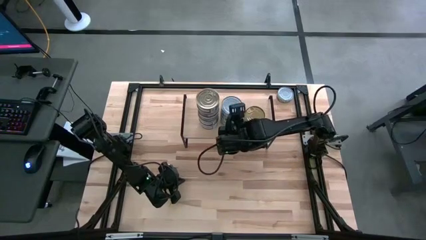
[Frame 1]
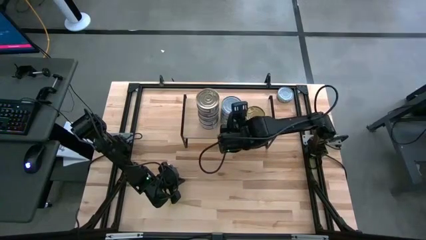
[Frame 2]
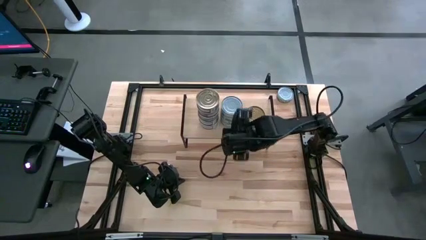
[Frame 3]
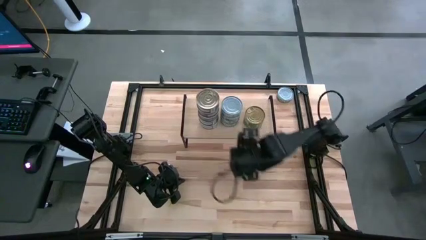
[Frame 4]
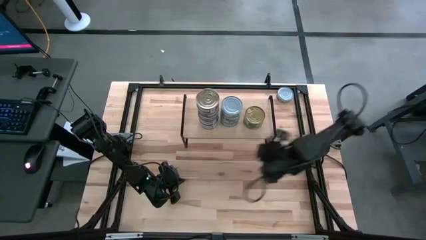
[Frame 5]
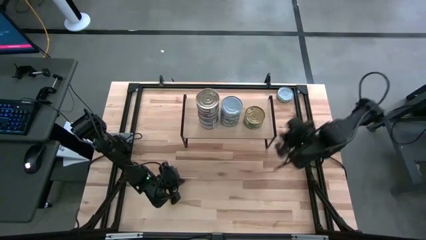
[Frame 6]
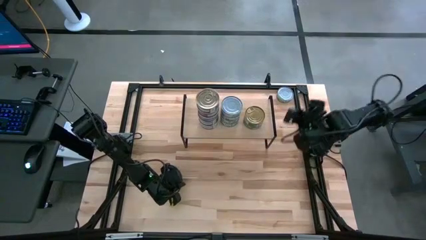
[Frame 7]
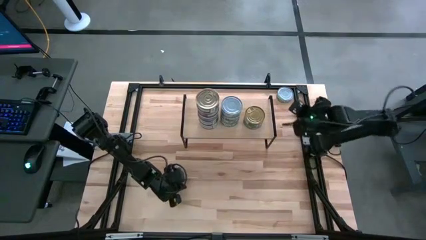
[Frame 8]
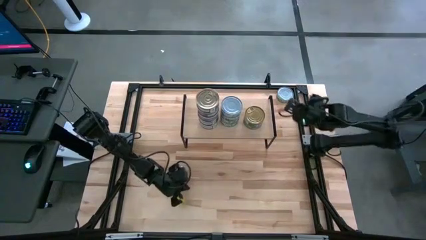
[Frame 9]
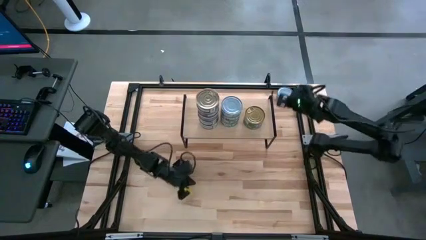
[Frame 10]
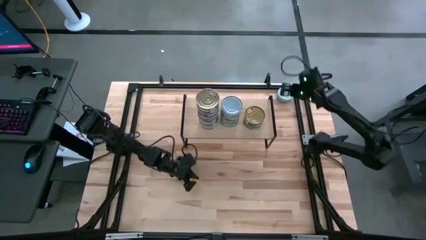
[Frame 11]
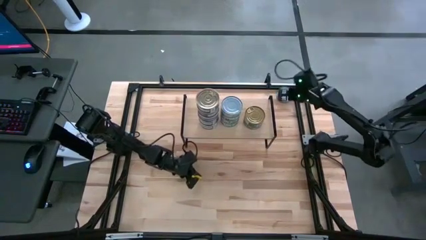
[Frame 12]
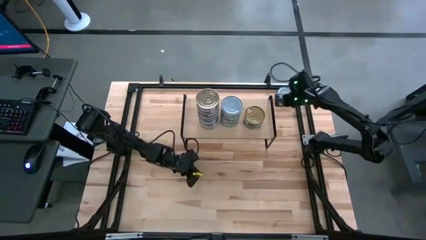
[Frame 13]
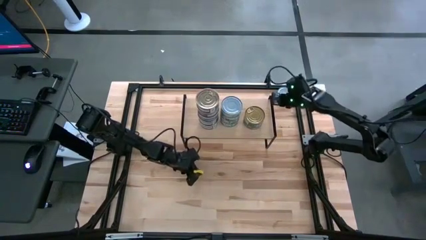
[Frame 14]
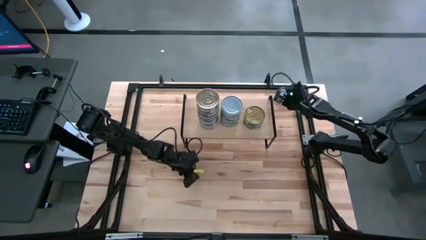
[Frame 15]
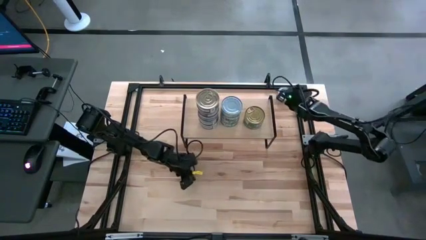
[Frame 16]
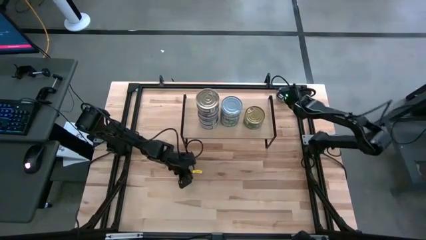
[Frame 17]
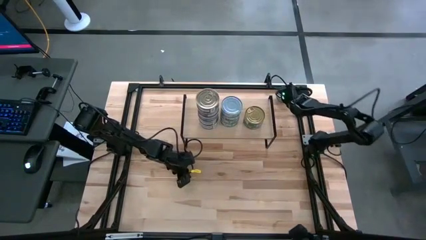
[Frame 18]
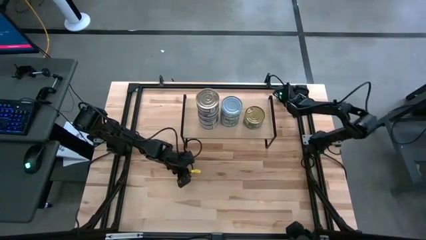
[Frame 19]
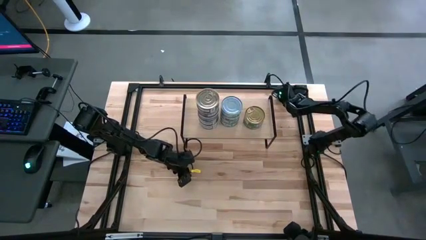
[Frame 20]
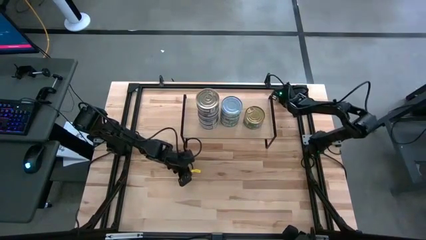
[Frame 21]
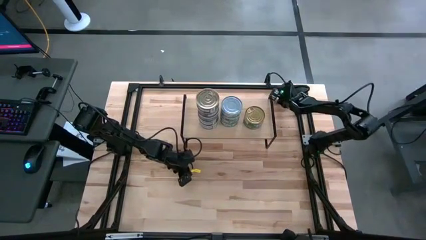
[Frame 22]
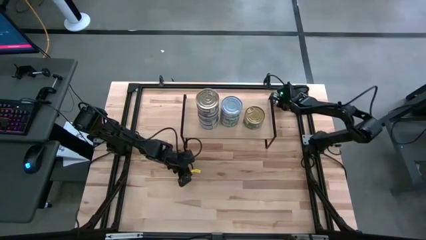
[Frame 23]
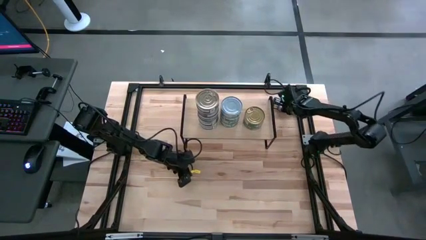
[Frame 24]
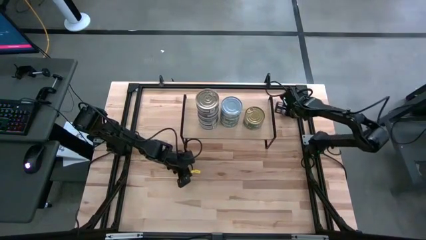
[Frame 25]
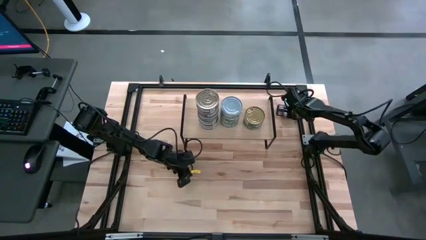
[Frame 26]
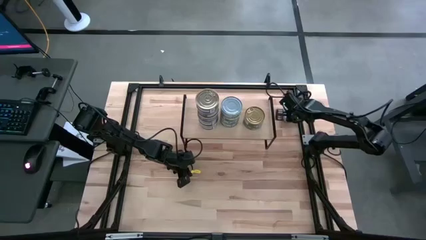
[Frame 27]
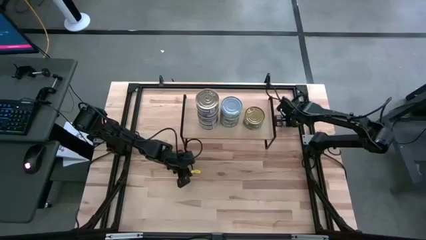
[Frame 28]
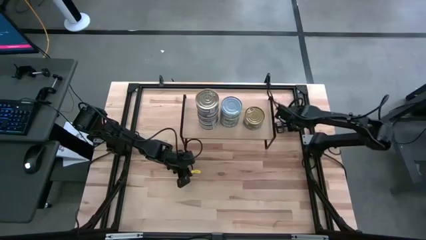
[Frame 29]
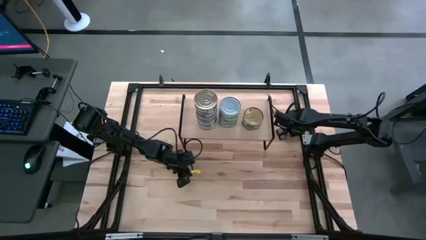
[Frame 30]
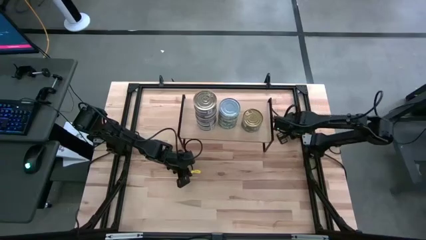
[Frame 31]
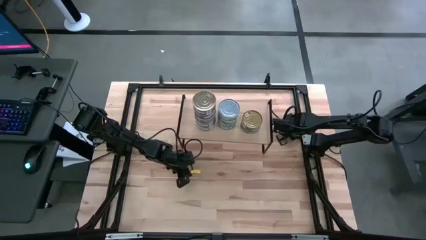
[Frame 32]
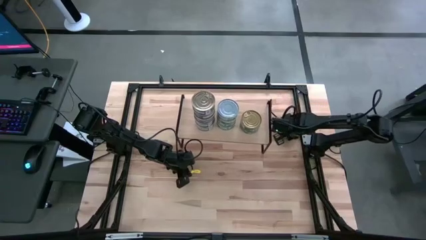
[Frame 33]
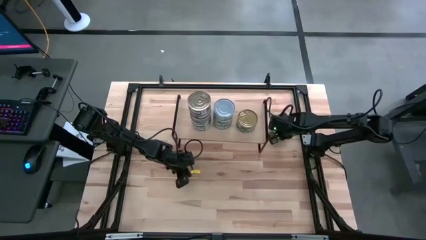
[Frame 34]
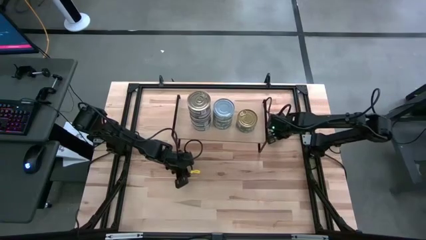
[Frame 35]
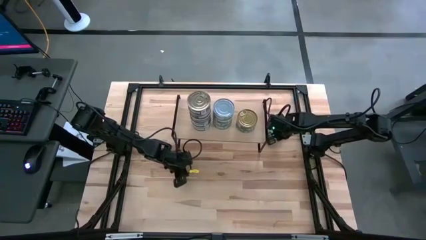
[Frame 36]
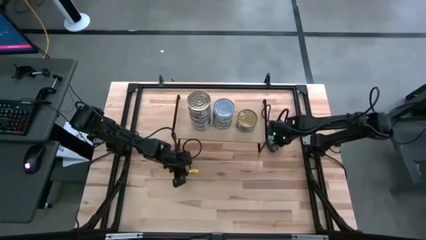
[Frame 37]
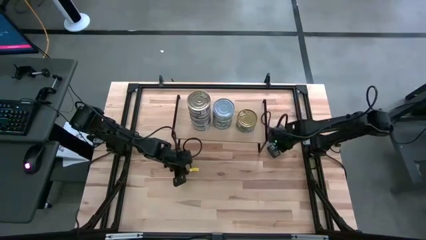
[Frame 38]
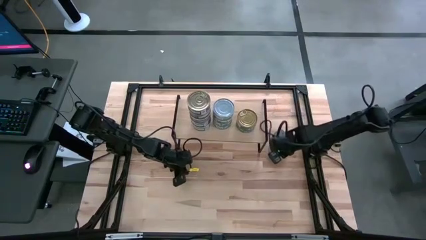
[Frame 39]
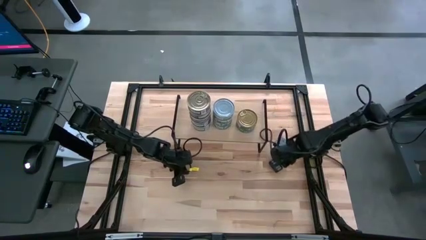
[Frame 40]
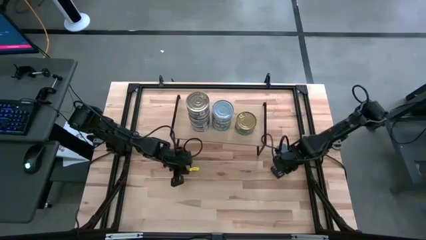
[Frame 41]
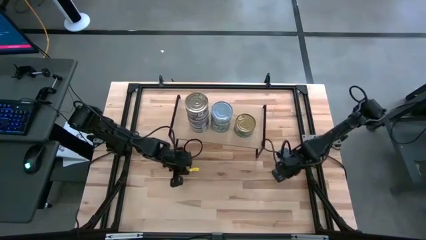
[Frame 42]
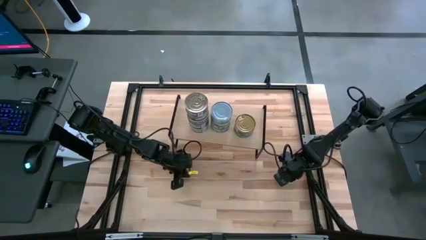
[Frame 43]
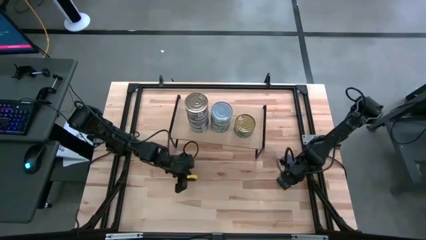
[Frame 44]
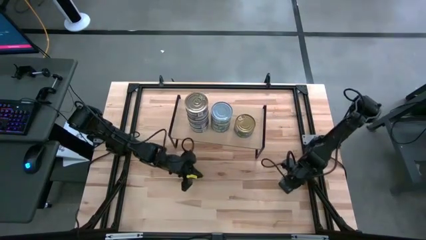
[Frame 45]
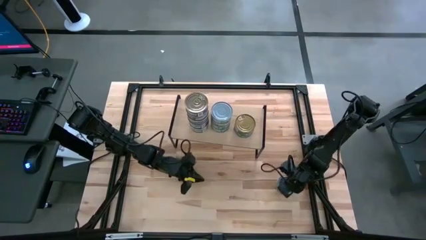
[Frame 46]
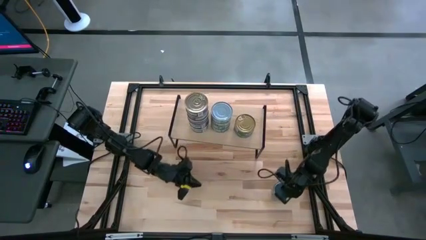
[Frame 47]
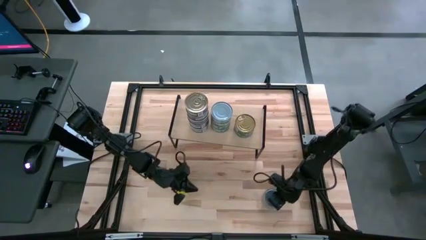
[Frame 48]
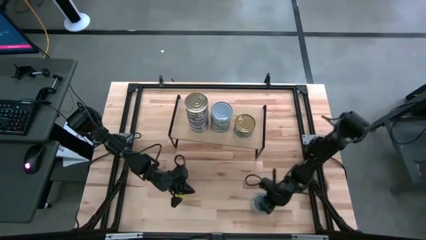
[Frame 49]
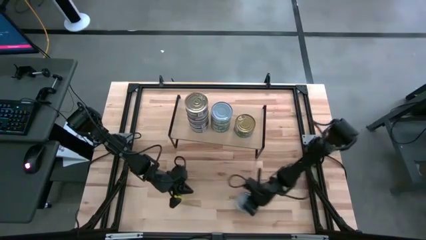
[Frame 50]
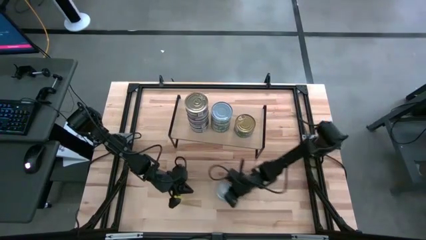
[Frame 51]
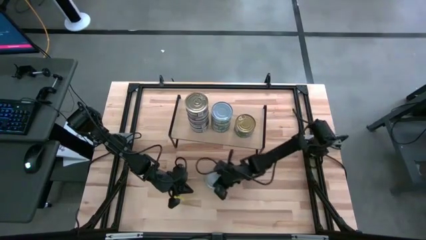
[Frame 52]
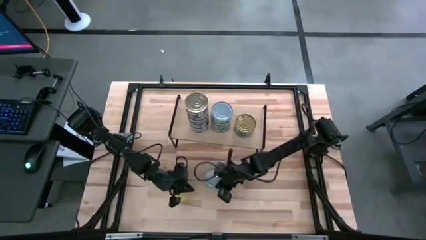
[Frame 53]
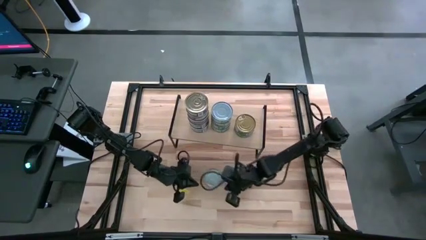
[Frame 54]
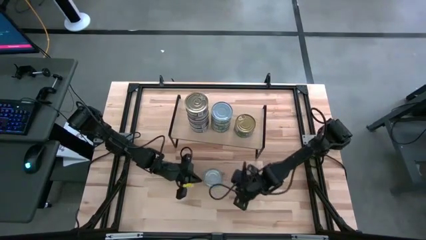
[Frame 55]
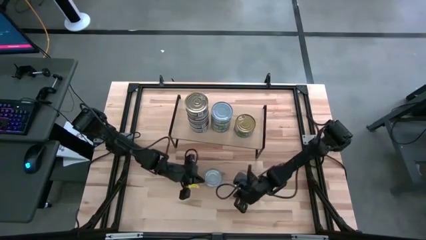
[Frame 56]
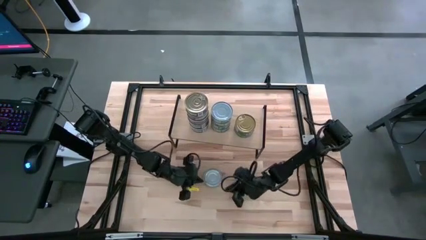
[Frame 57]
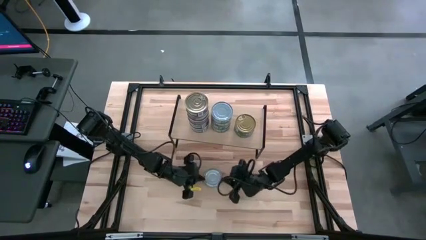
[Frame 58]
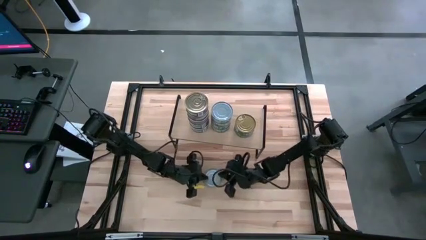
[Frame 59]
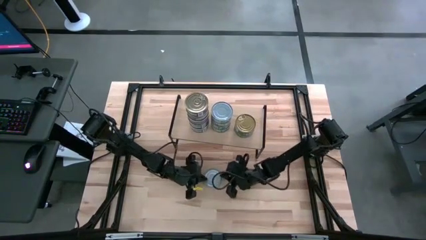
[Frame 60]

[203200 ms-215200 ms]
Task: Stack canned seafood by type on shelf
Stack the white-green tuna can on top of the white-green tuna can on the shelf

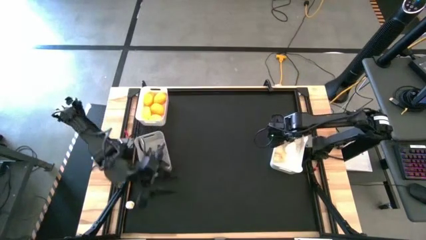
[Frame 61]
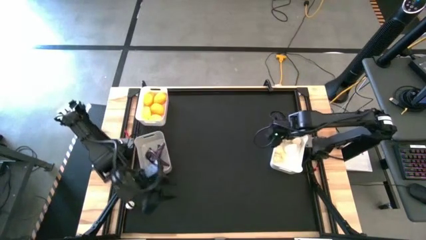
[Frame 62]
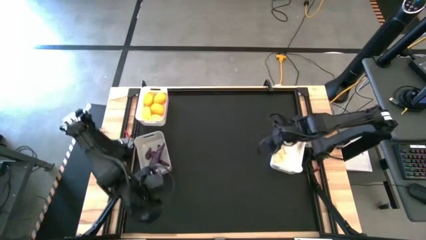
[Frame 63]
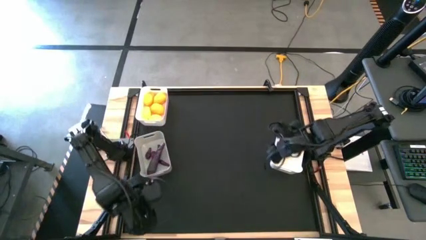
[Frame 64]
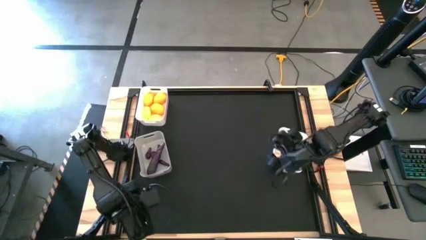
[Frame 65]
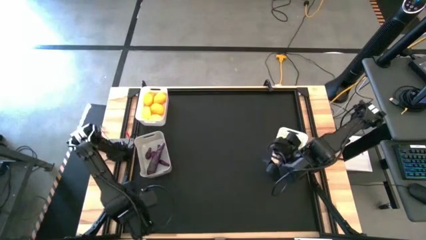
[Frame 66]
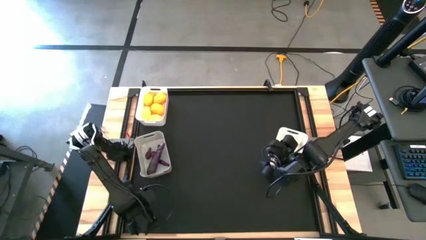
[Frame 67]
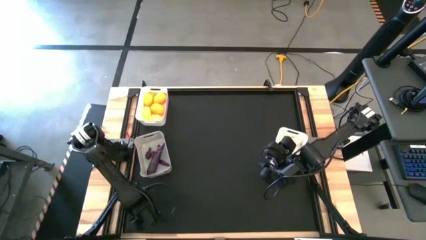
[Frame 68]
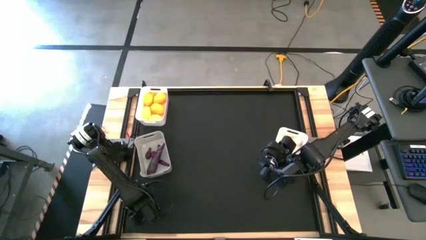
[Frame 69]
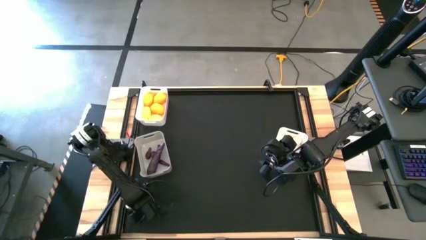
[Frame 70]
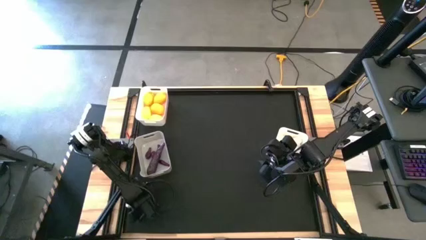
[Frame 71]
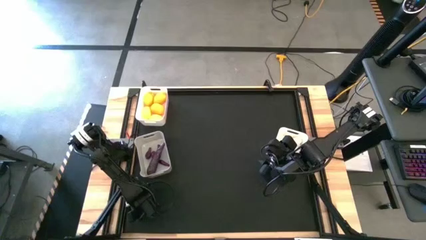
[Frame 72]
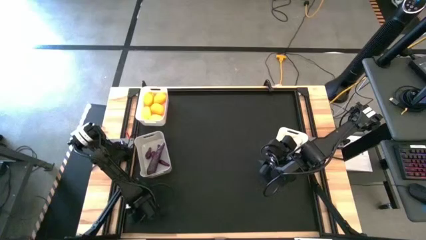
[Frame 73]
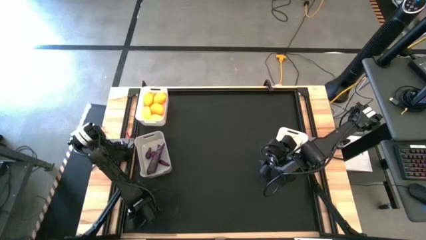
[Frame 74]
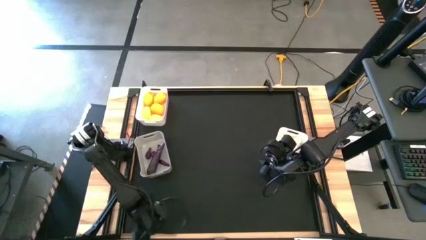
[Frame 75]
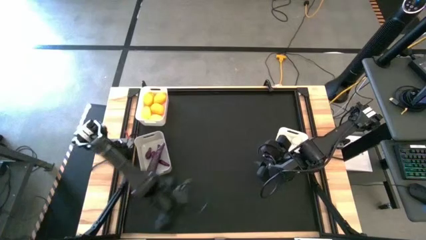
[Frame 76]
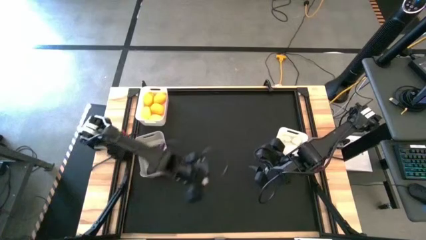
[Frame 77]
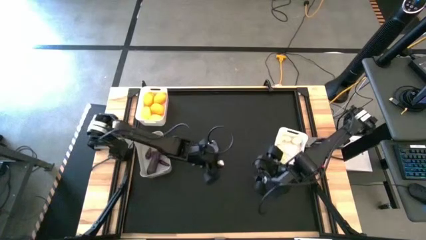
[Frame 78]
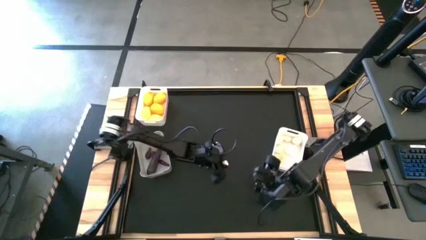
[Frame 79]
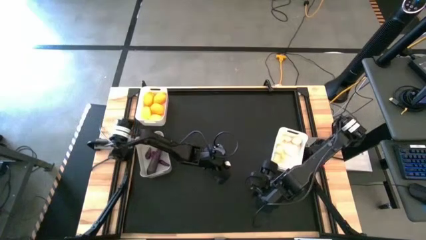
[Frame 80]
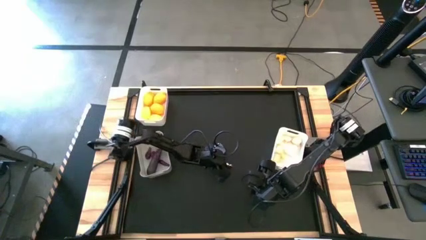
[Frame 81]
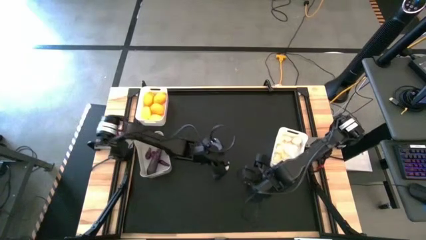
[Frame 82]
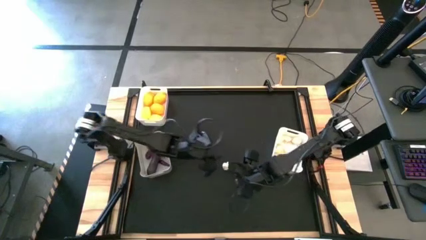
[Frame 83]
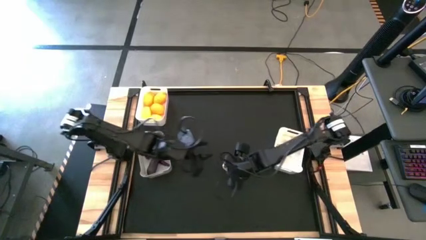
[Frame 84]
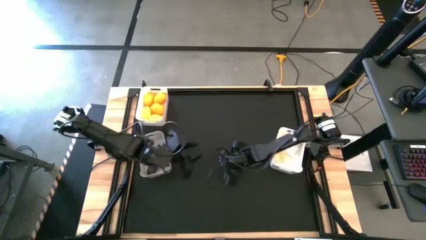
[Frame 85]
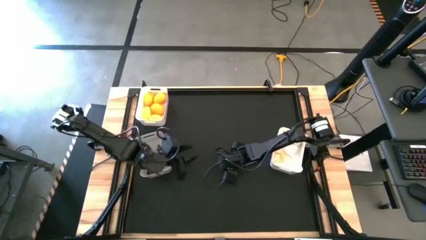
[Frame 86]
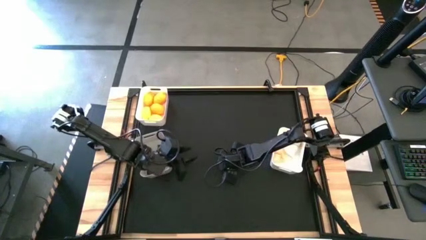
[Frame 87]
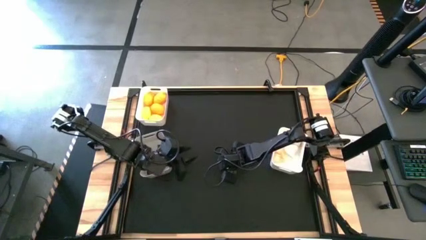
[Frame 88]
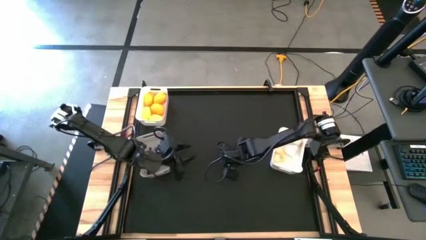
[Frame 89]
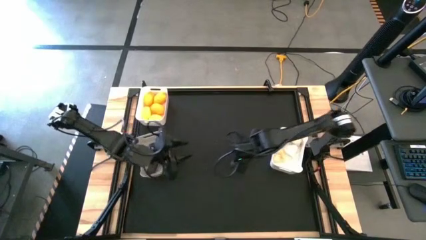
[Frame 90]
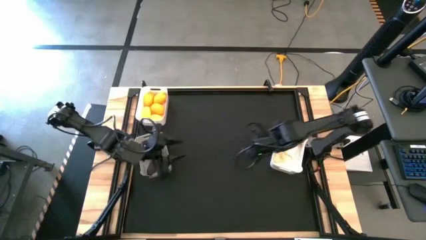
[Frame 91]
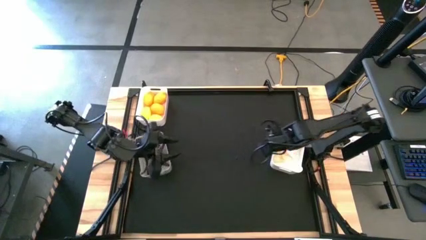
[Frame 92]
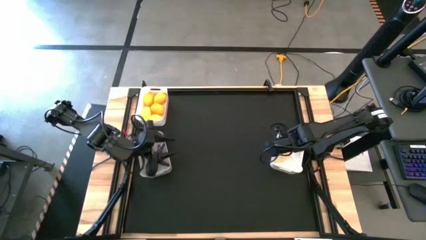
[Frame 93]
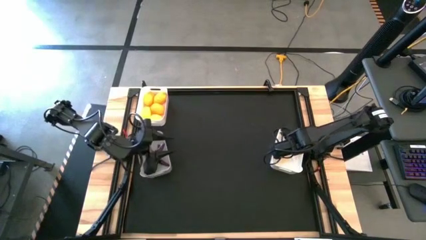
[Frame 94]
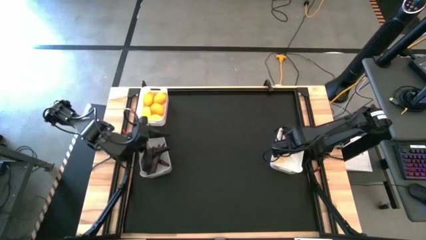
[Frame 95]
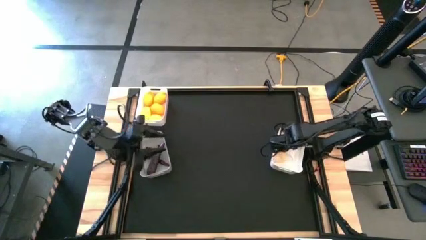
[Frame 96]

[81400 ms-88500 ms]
Task: Sort produce into baskets
Put the white garlic into the bottom white bin
